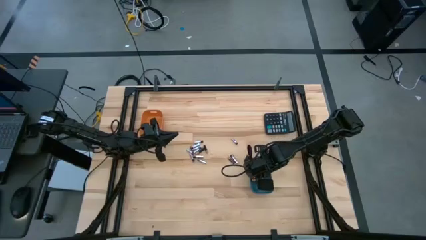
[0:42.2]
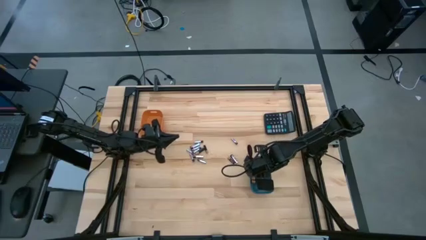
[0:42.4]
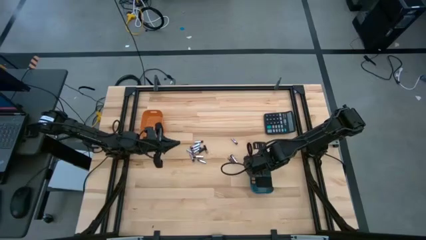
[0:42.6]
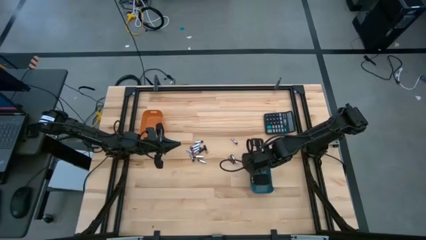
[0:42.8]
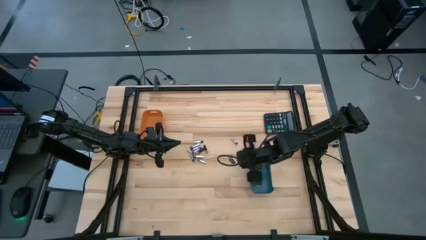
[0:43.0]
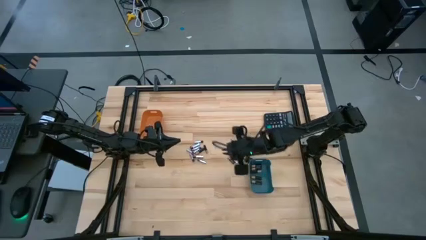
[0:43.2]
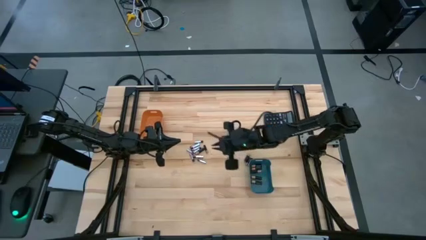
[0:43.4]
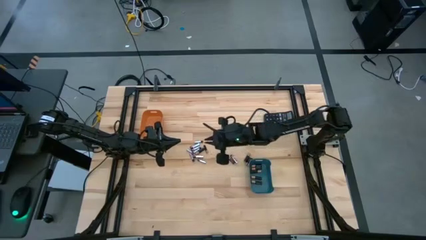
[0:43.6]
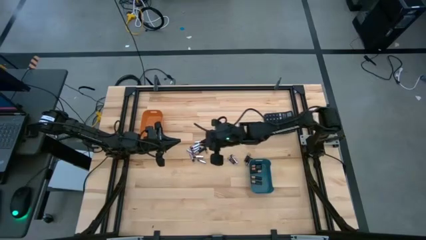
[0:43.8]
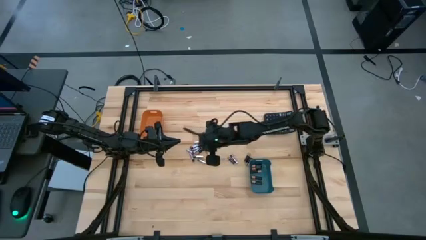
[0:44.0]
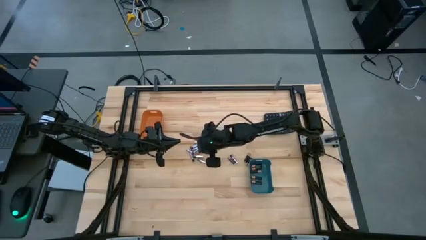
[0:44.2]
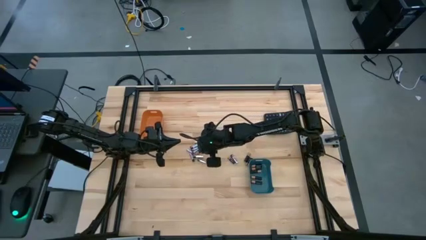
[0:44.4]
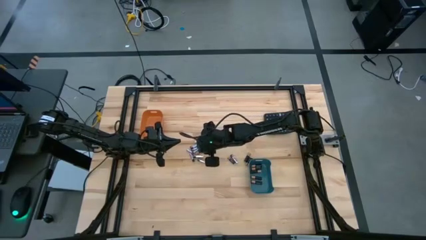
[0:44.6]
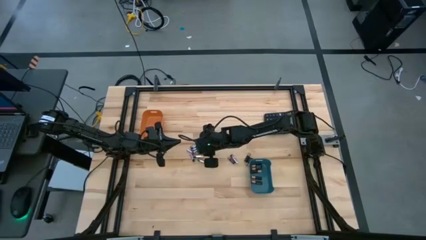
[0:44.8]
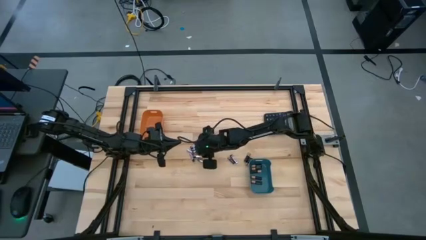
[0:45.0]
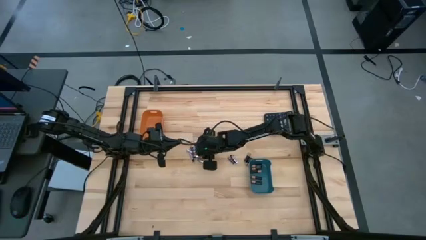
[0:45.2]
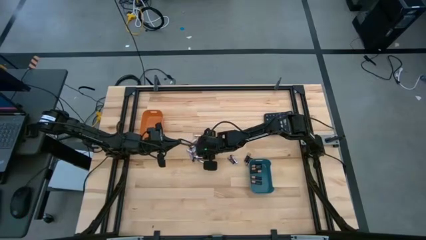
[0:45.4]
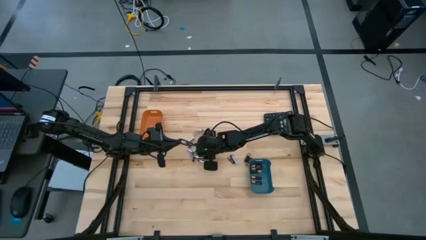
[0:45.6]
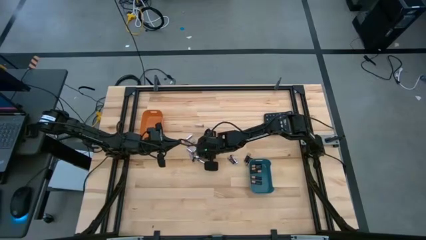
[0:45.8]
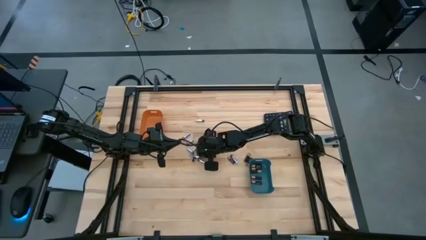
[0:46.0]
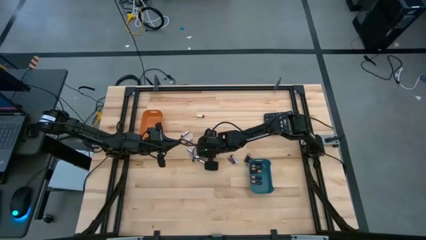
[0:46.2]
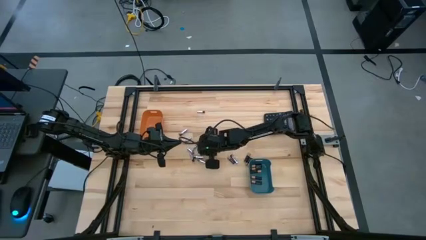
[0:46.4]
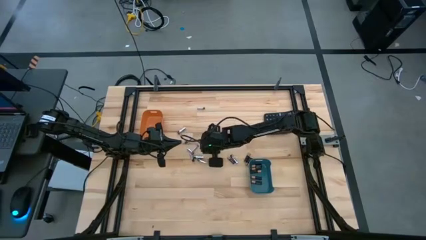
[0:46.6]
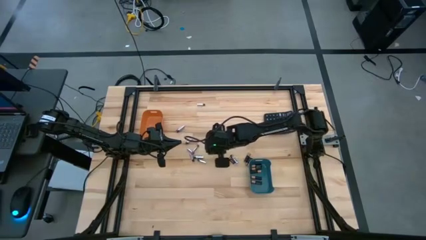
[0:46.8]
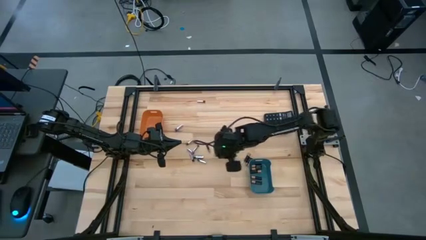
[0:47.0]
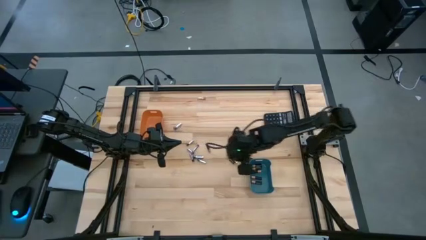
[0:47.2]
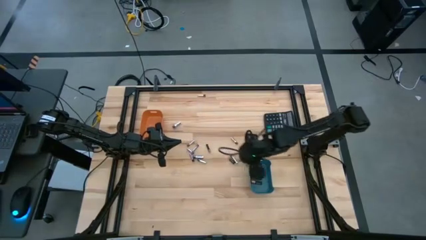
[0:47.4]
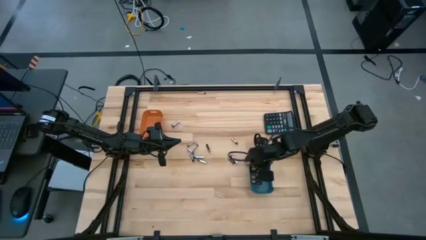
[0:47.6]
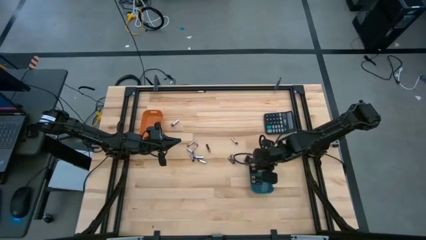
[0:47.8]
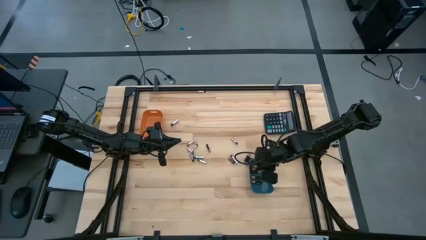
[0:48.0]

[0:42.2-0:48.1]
Task: Sort batteries
Put the black battery into the blue bin

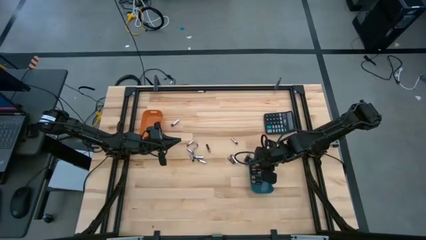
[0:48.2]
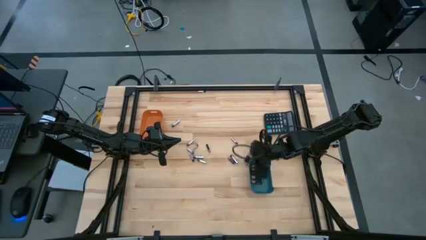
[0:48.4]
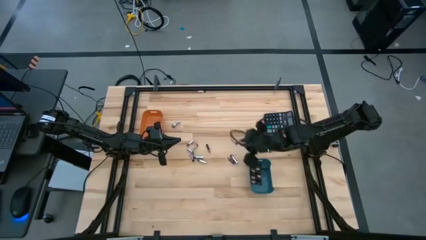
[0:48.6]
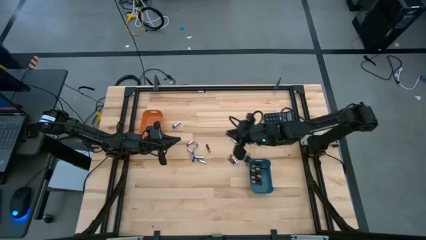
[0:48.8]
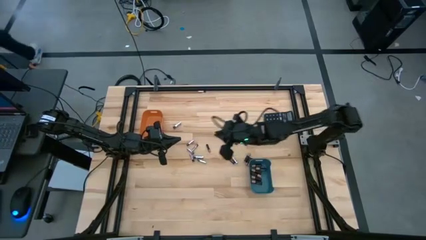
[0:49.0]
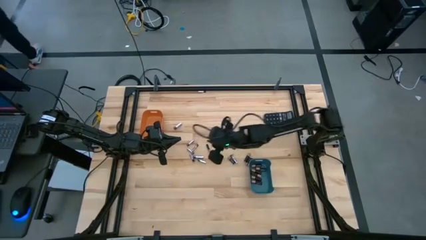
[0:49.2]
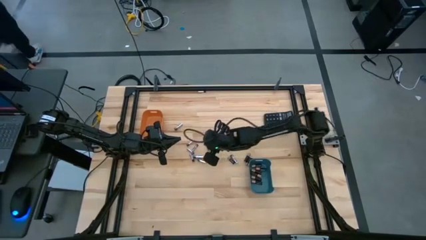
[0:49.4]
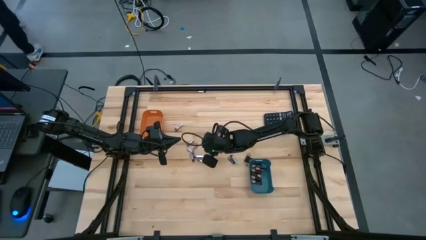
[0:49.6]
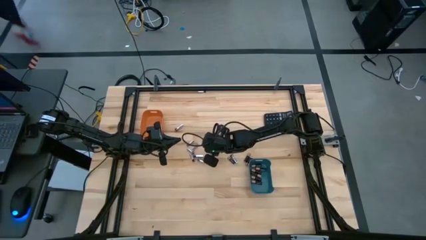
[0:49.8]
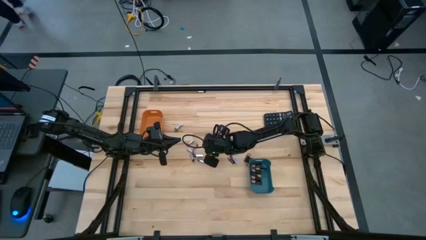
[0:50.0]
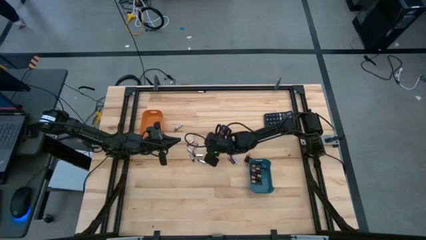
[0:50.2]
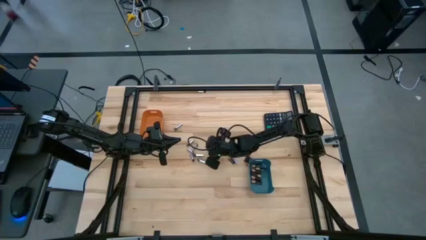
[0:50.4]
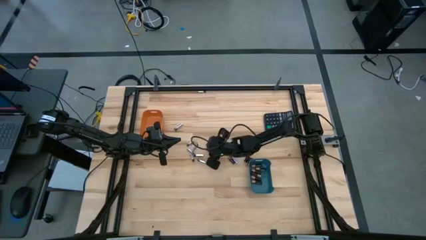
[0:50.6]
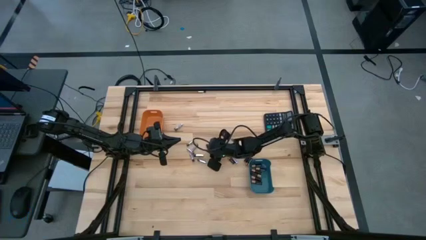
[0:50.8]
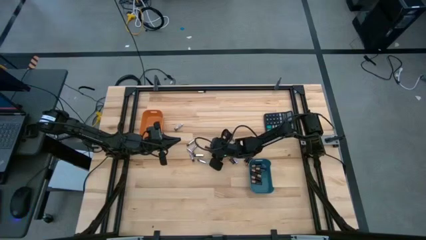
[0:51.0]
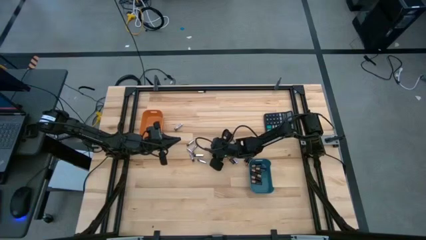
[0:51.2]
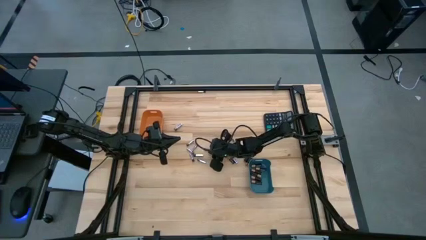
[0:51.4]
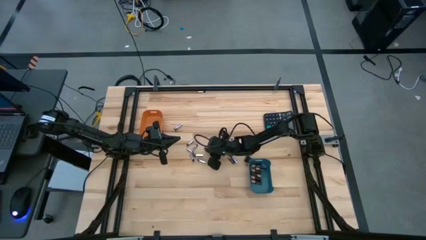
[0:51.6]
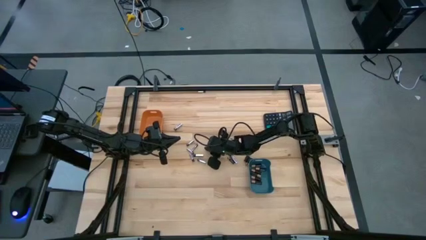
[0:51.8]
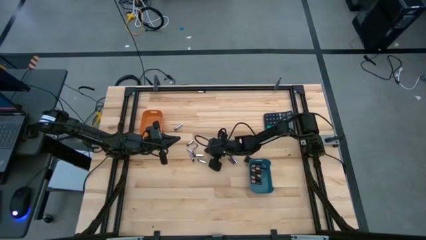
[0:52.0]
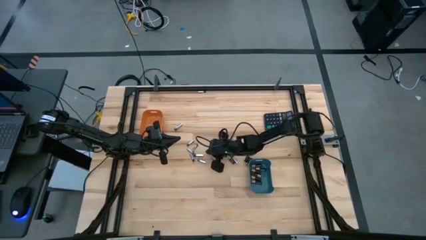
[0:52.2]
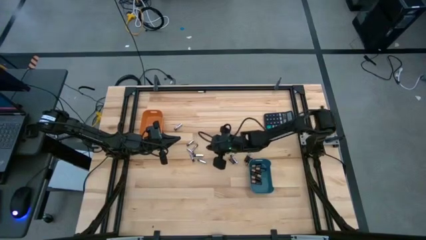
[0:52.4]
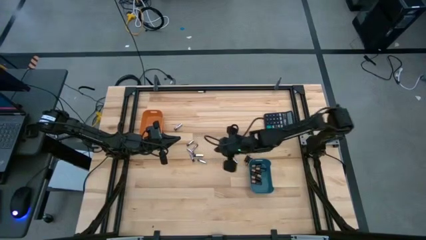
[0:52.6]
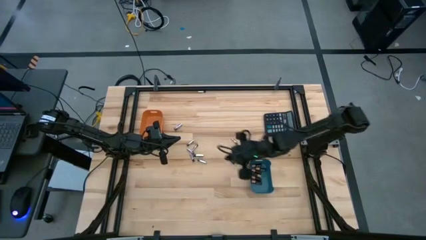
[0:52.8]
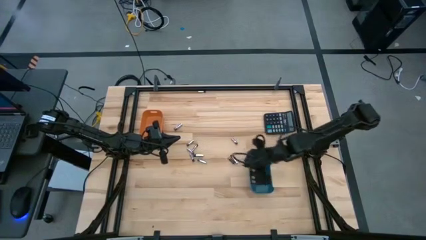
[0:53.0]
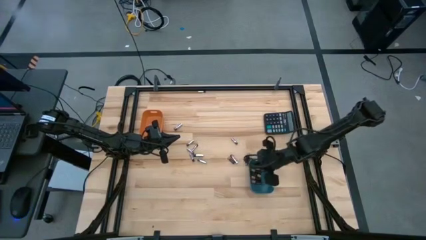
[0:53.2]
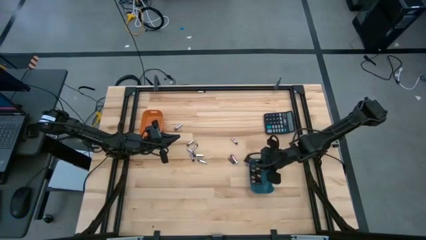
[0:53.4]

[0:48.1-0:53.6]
Put the black battery into the blue bin

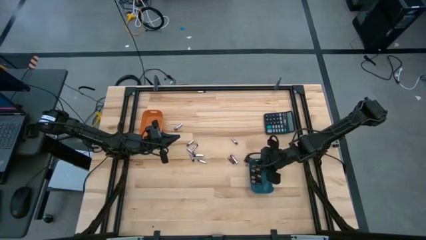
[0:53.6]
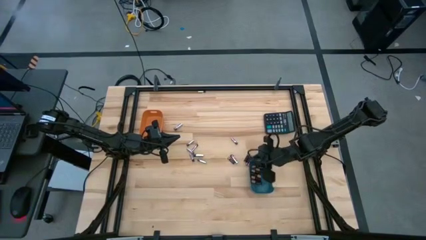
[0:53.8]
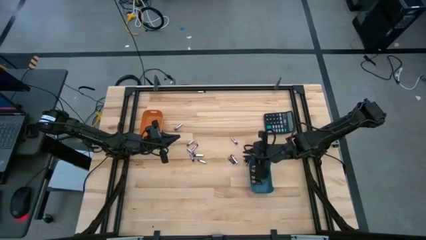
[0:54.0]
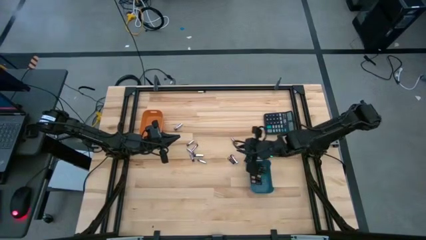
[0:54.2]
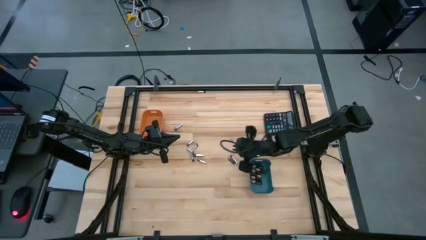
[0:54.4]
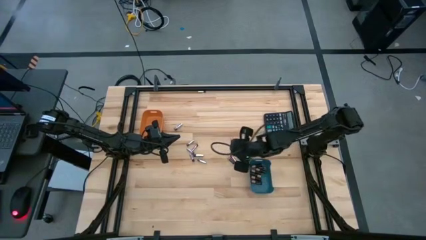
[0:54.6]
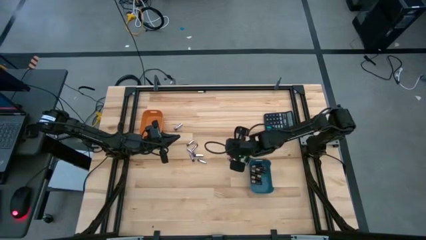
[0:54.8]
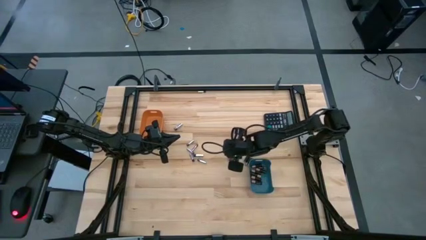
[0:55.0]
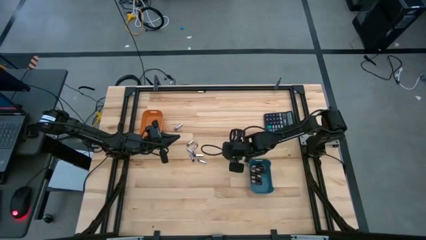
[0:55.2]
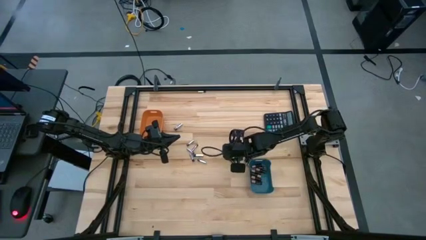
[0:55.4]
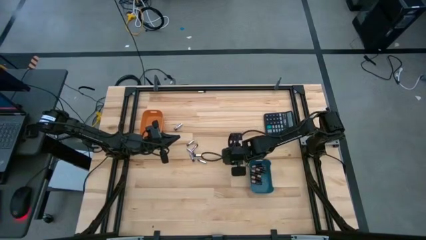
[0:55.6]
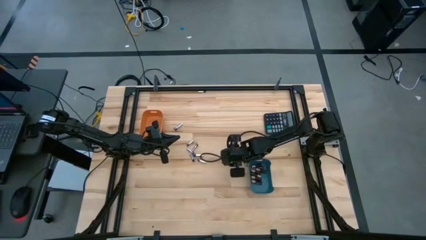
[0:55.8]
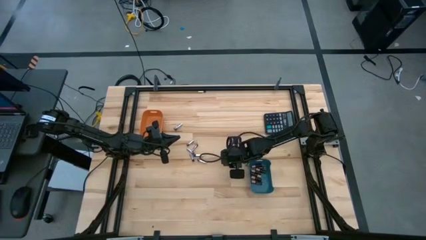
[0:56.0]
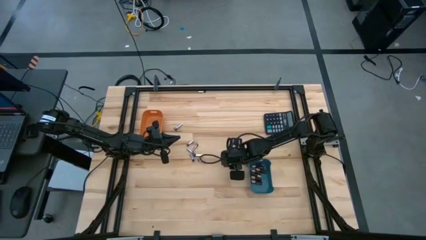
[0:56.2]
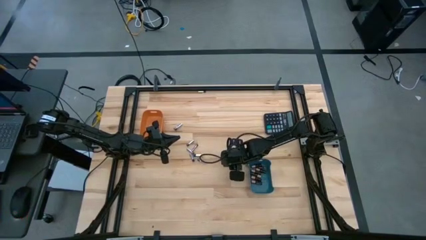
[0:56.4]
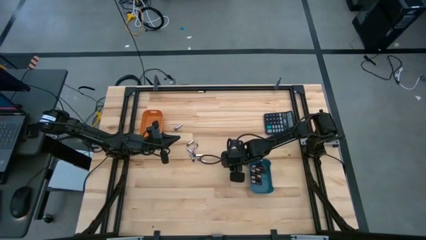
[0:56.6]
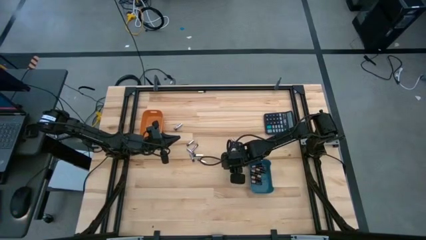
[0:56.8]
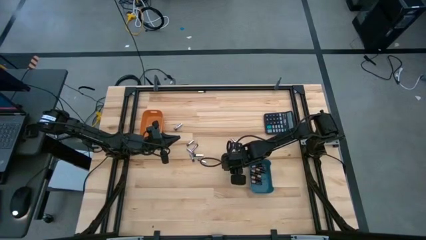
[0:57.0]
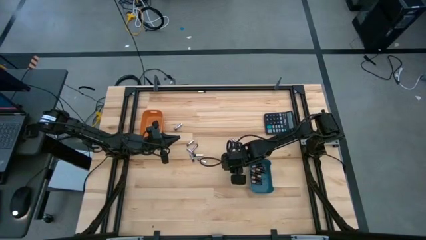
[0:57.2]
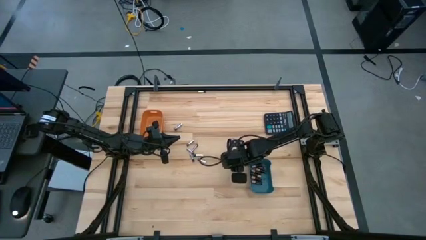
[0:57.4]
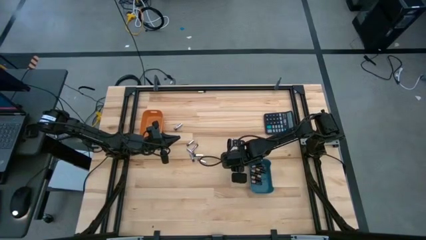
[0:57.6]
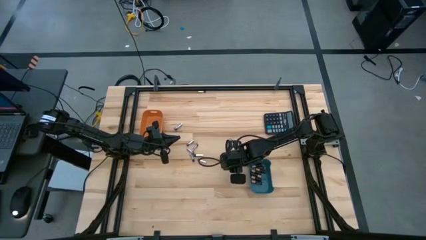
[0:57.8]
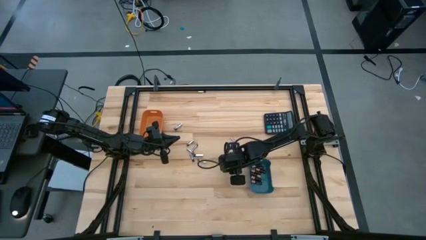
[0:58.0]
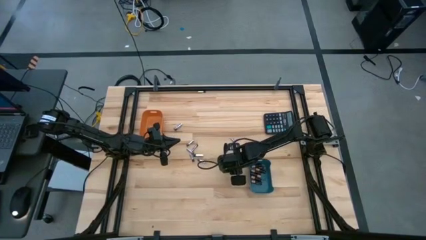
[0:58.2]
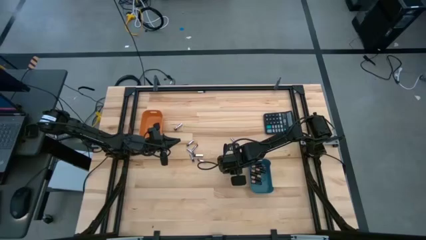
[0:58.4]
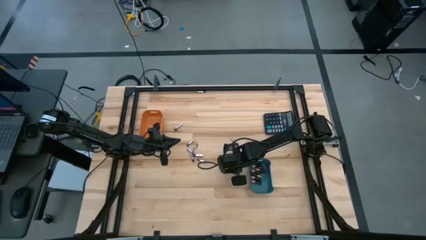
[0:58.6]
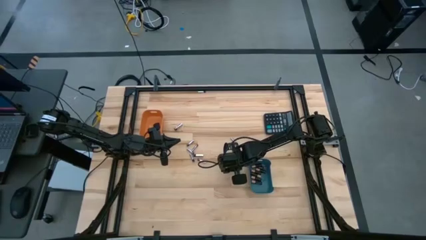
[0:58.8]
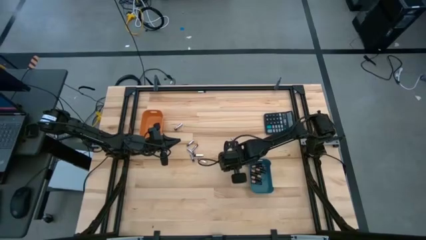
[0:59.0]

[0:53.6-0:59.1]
Put the black battery into the blue bin

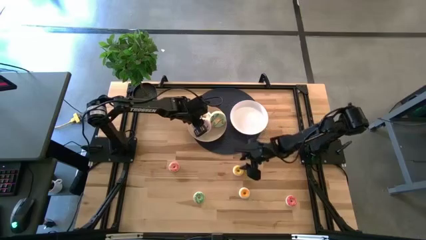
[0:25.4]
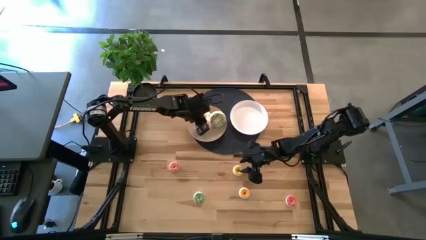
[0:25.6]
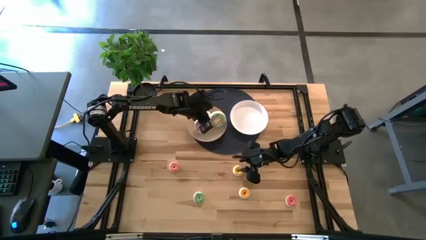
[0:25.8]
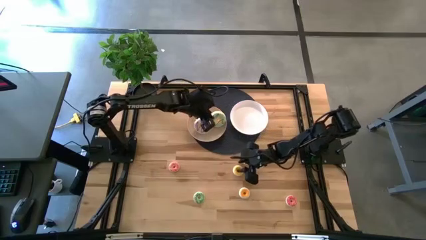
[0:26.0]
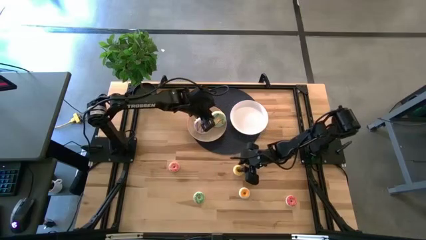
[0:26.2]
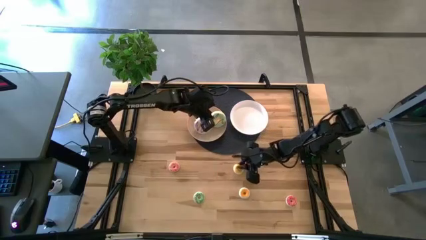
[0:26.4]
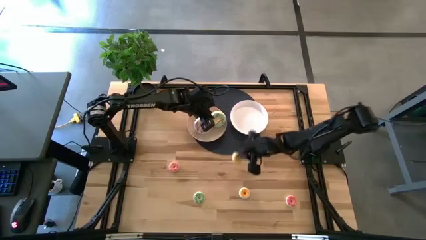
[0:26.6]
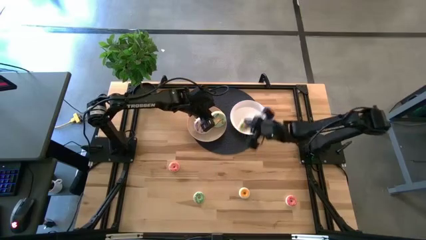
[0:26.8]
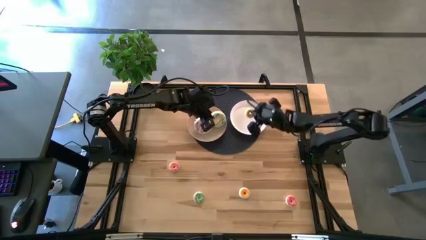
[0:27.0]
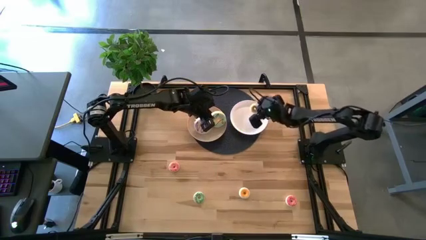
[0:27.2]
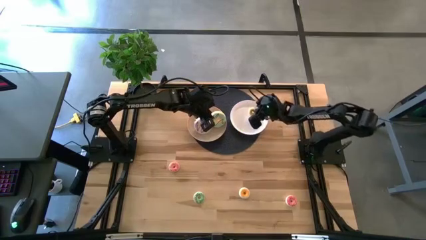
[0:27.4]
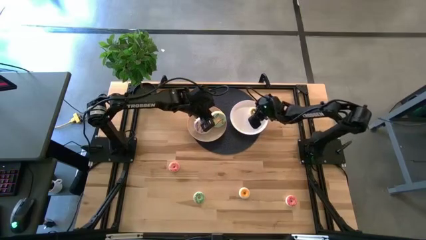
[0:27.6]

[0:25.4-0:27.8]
Task: Pick & Place donuts
Put the small yellow donut on the right white plate
